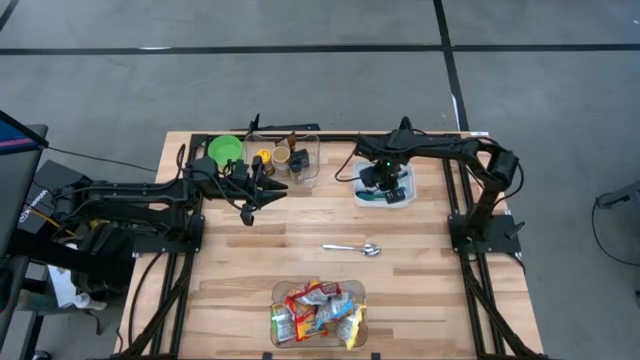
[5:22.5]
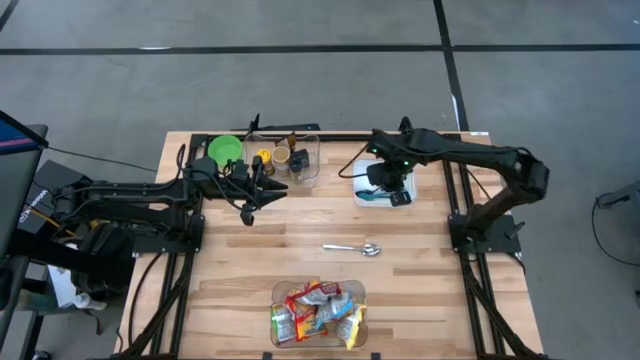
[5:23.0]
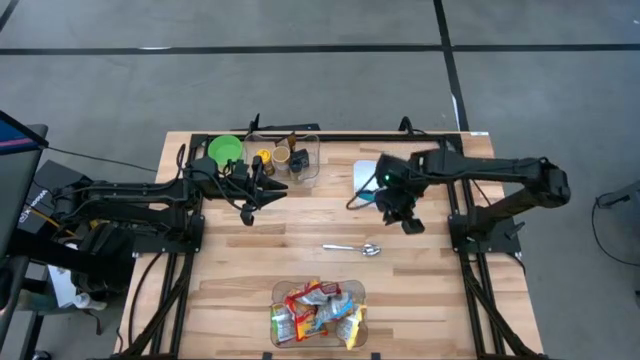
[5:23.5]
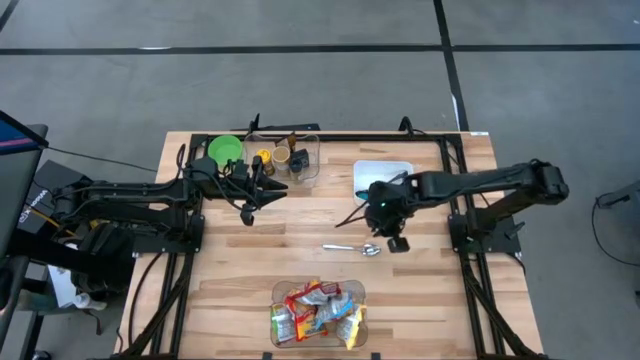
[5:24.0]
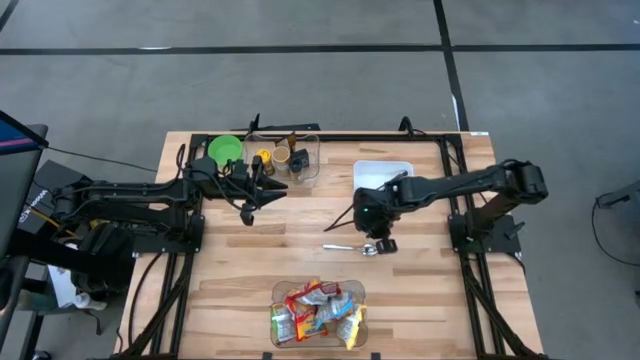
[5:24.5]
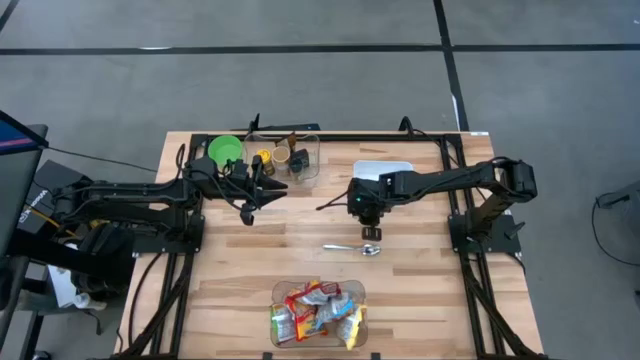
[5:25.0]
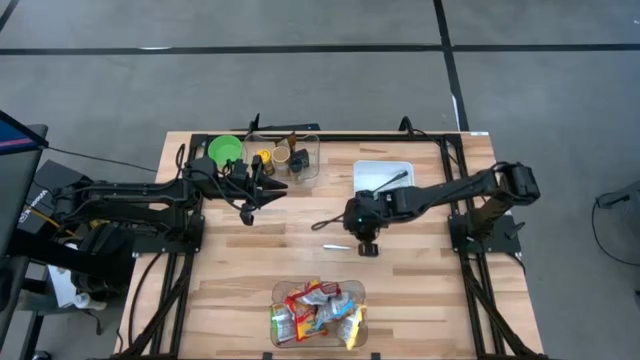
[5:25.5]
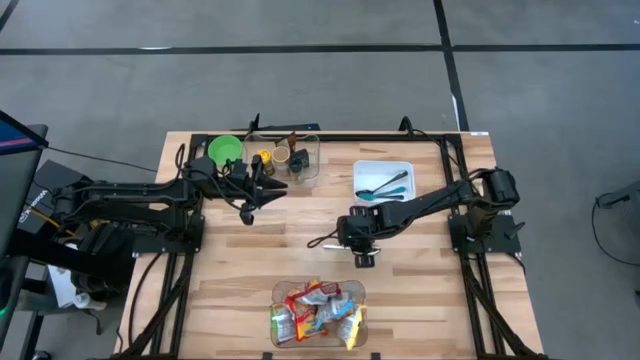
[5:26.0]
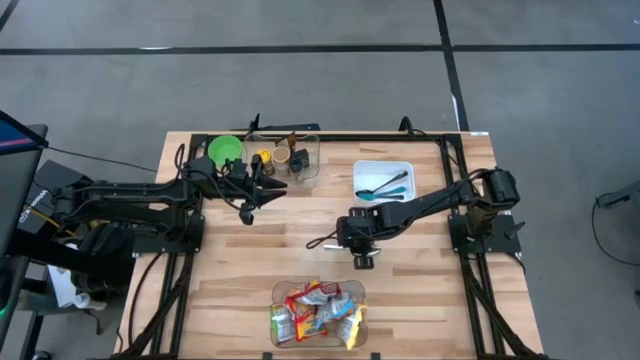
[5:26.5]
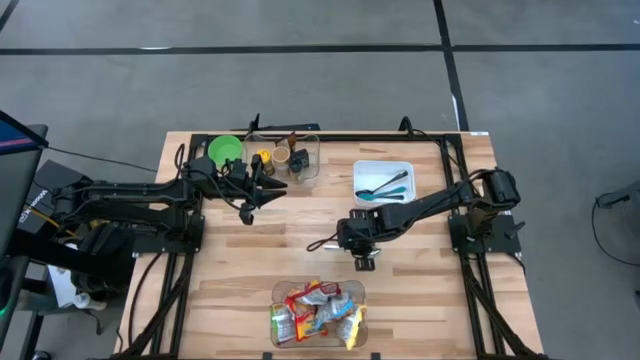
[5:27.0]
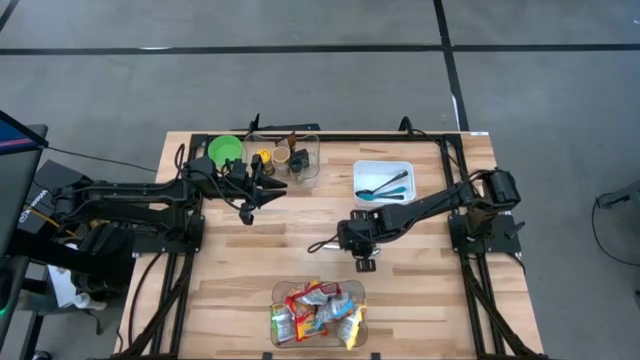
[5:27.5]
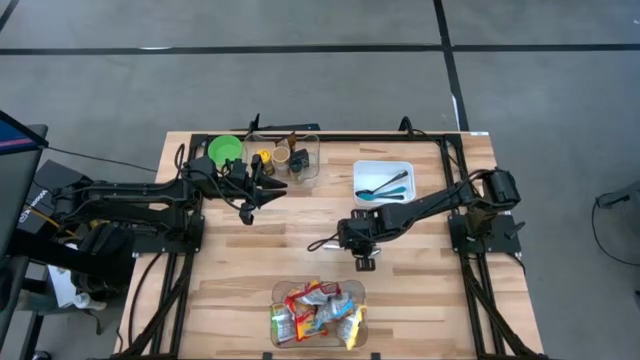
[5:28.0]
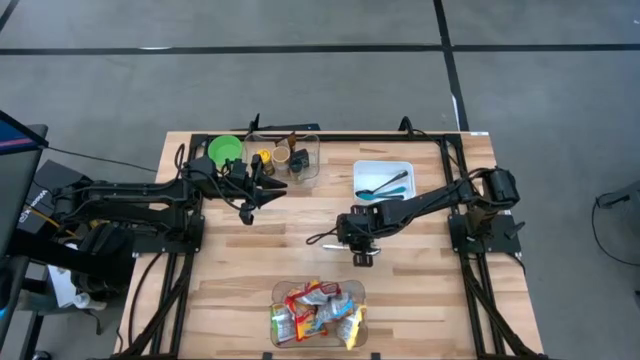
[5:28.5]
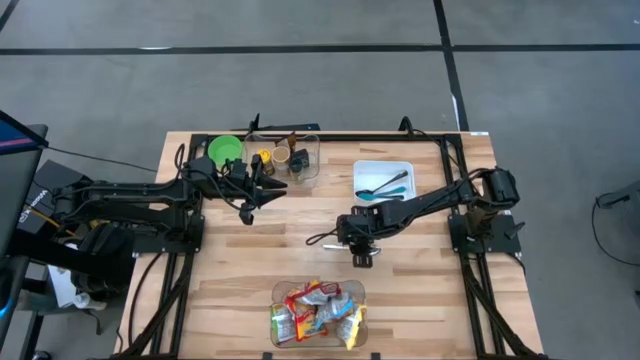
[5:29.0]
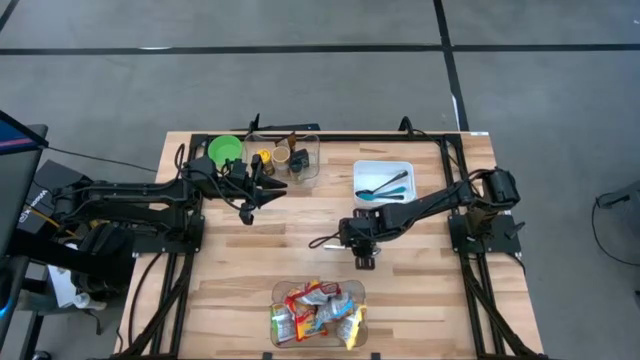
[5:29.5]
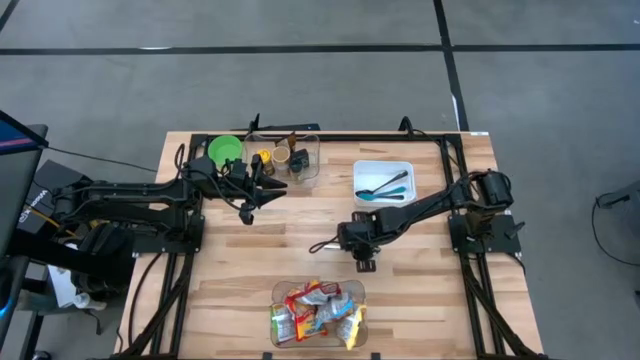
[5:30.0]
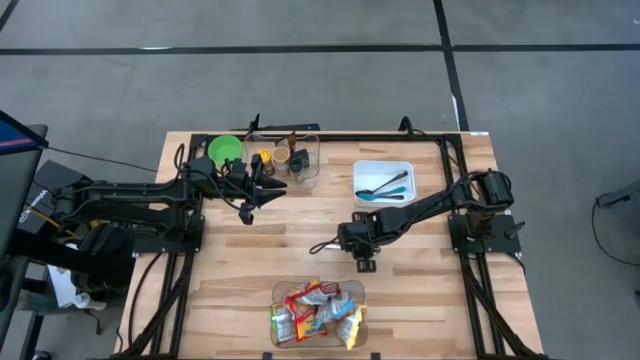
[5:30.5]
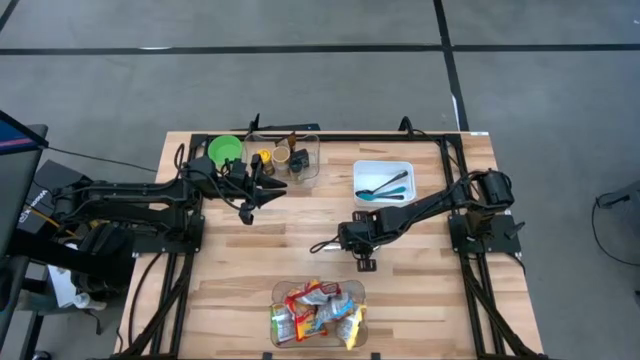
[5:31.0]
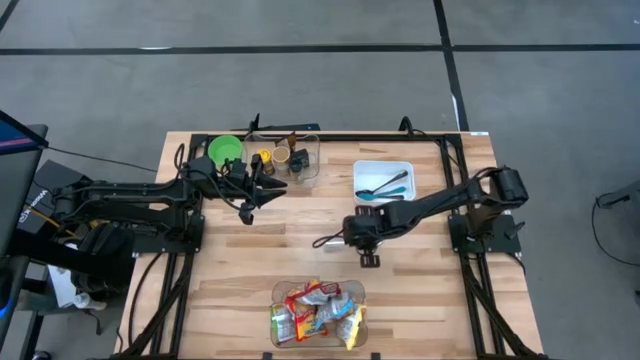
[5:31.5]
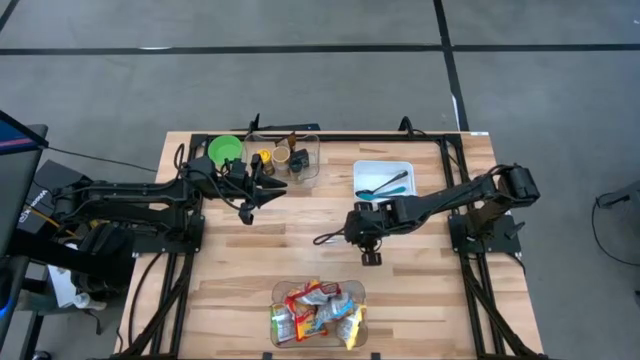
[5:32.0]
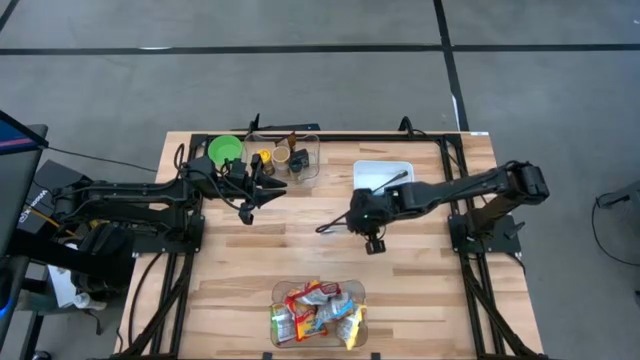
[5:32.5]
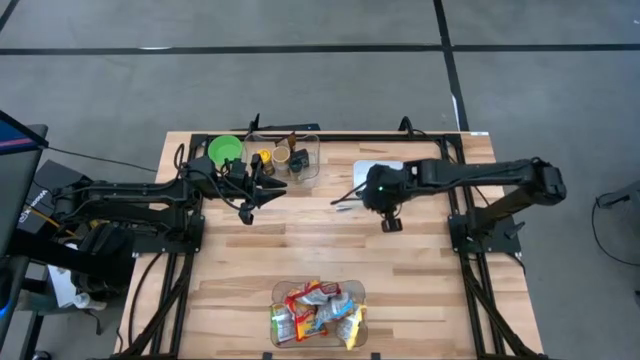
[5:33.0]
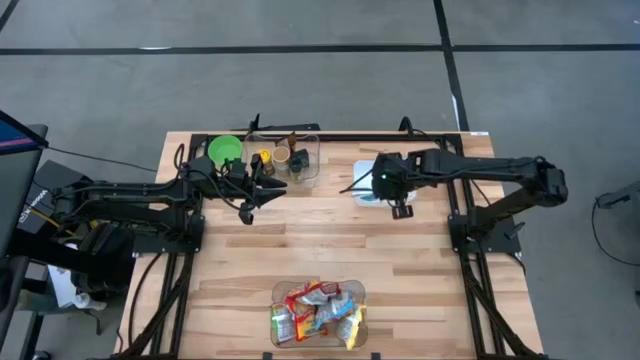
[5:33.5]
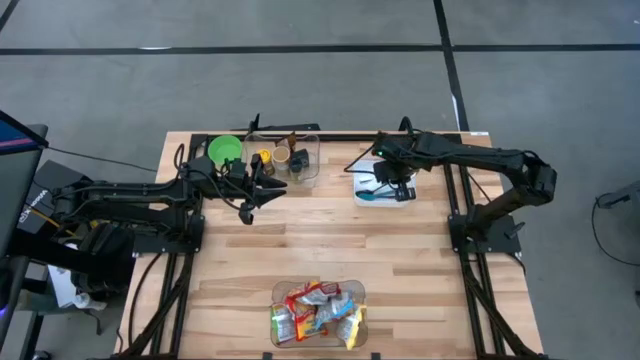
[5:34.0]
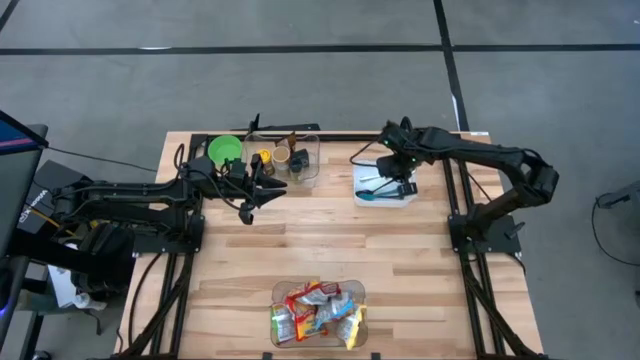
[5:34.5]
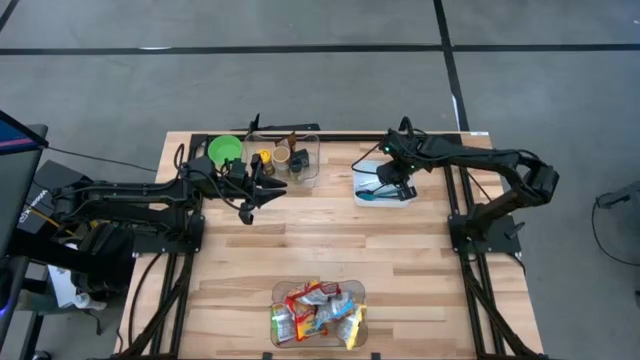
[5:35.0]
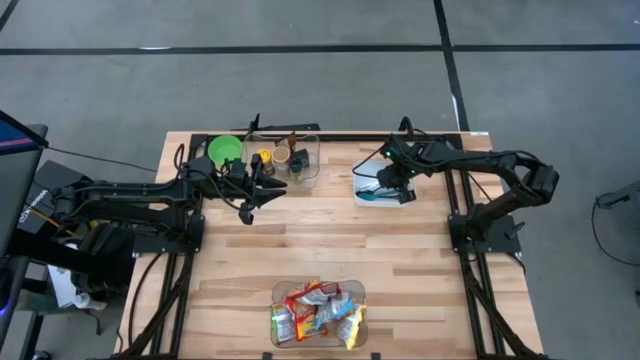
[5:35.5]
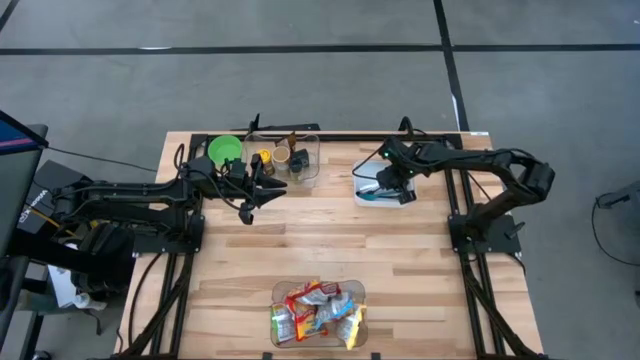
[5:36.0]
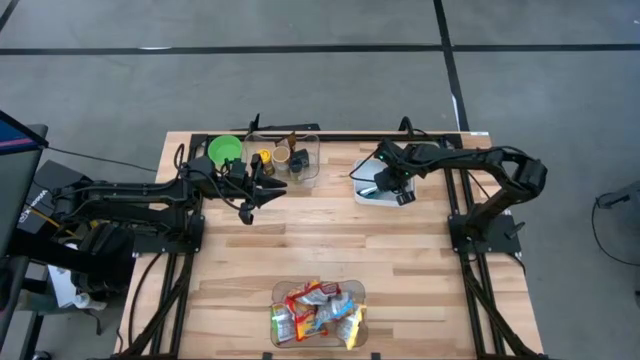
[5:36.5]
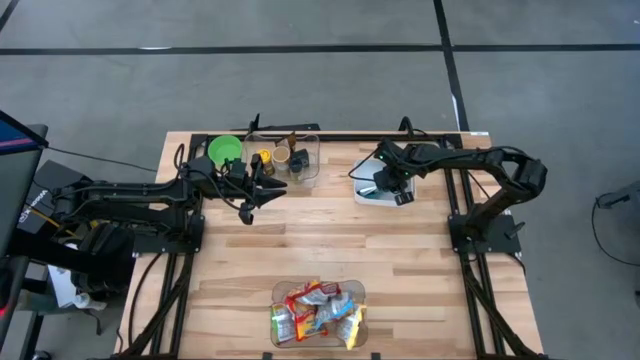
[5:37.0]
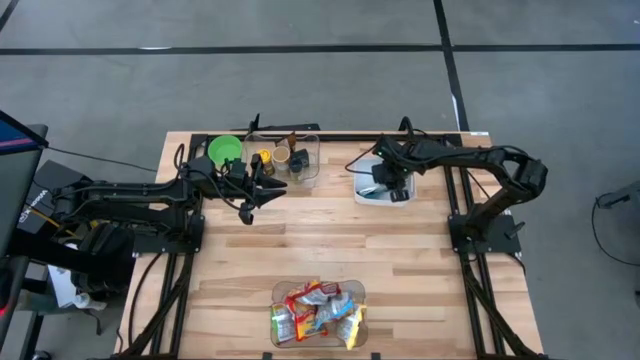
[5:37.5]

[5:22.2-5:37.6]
Task: Pick & Place Food Item
Put the silver spoon into the white bin

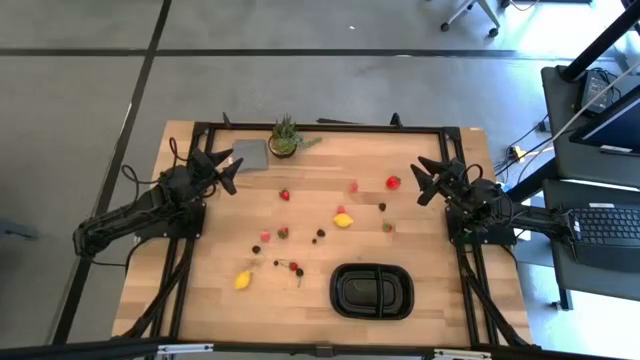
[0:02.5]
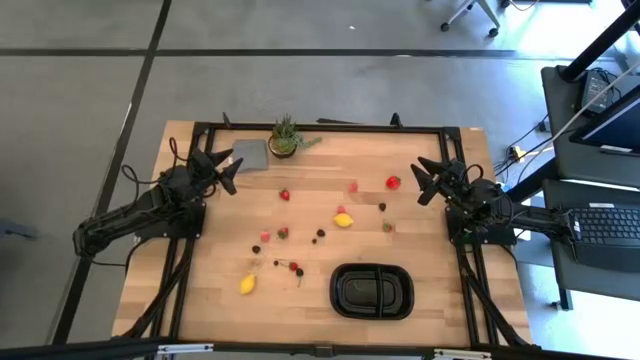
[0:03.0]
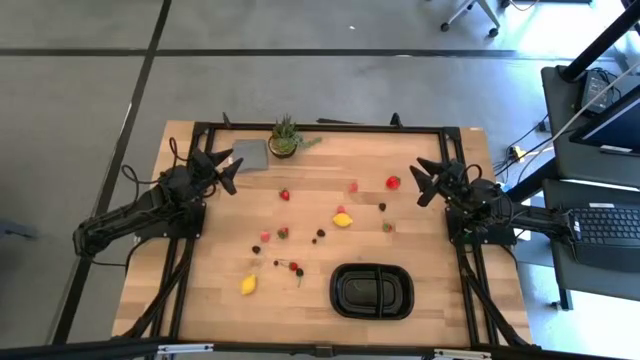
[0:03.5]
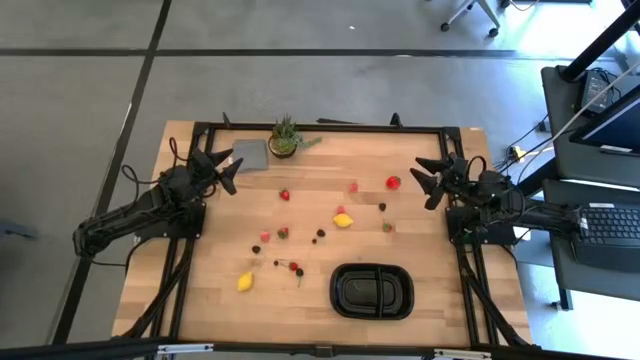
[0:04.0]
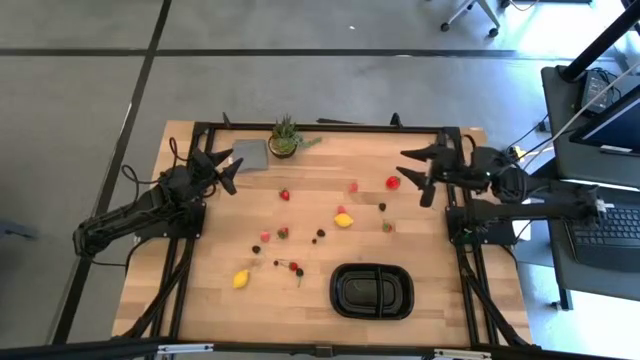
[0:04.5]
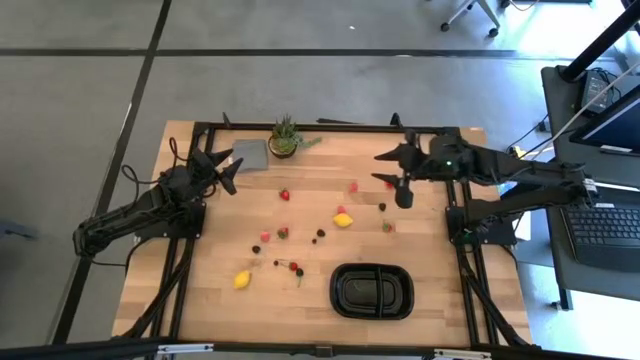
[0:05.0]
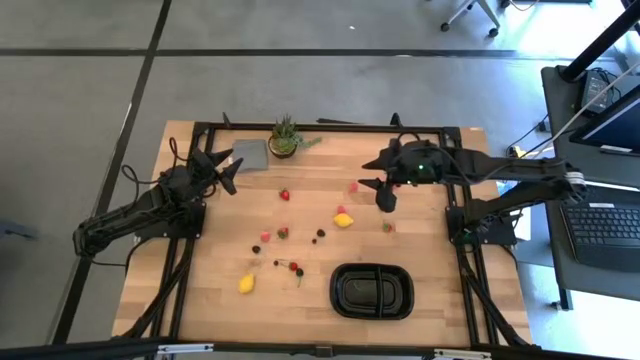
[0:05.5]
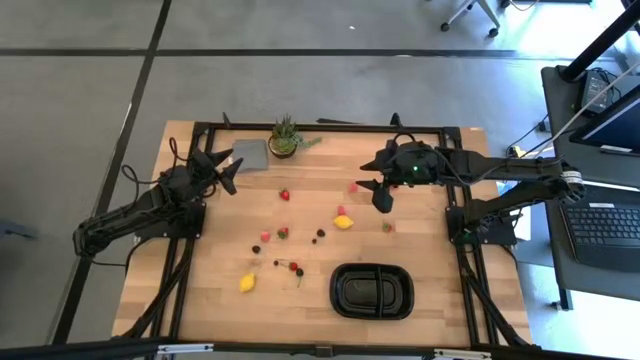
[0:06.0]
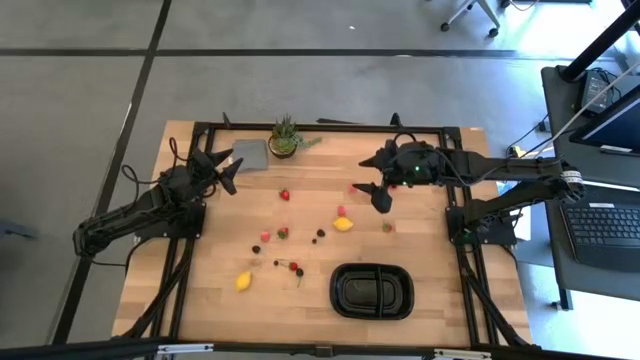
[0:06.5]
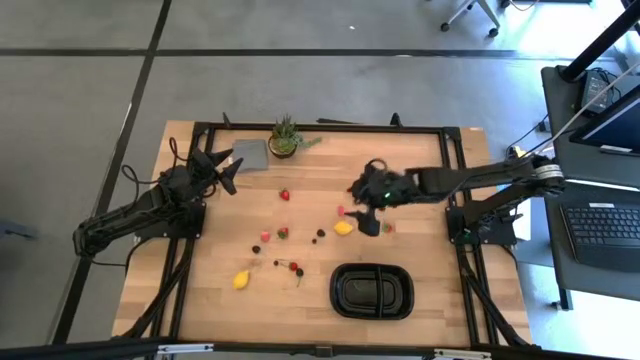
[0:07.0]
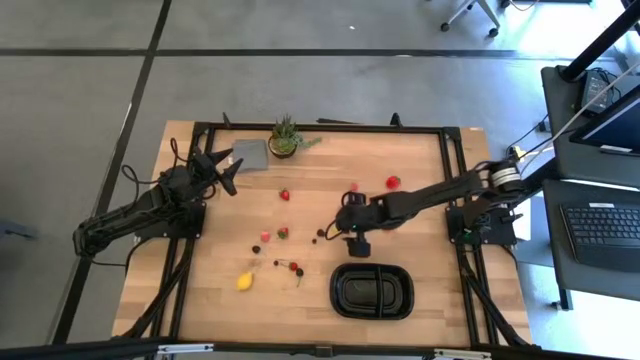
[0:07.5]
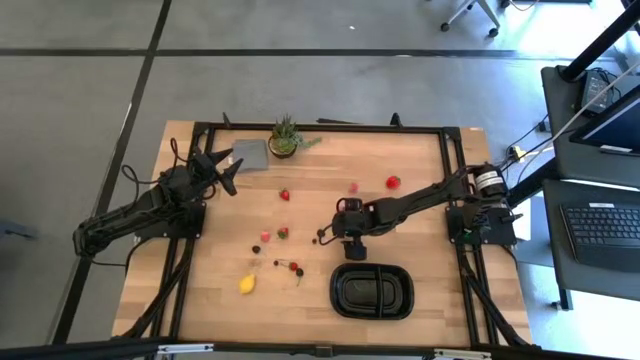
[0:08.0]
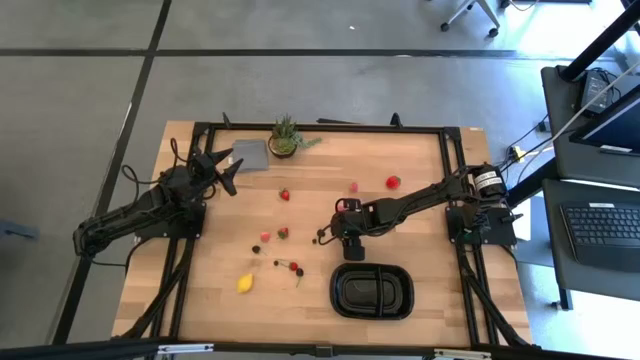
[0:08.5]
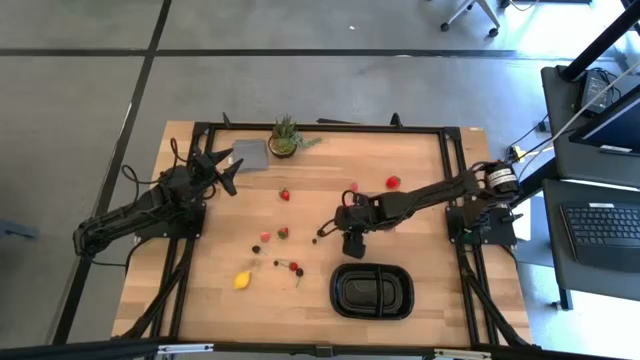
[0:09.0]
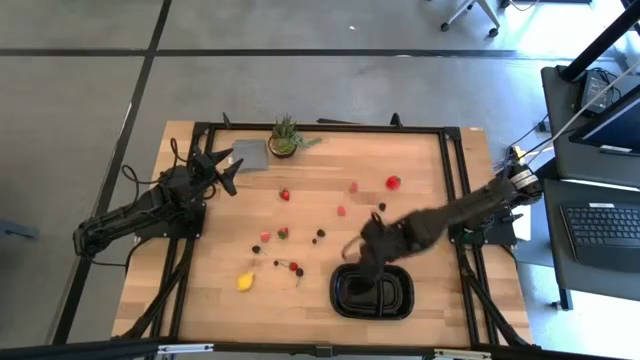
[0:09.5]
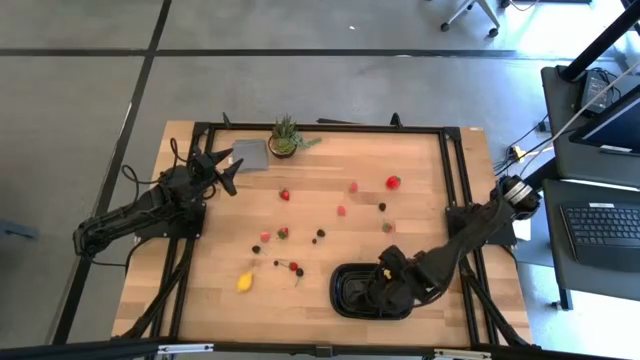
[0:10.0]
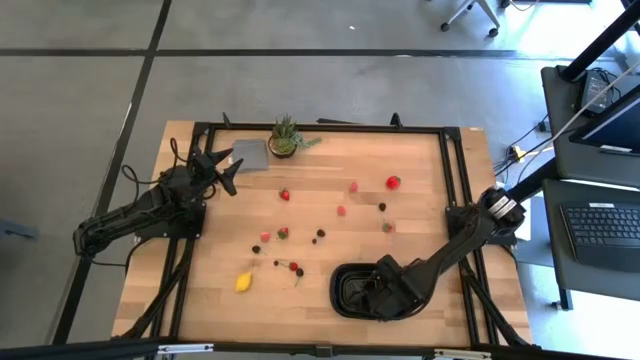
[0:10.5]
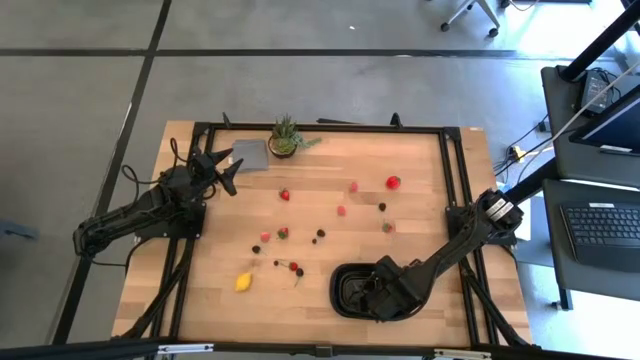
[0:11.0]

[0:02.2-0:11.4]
Task: Pick and placing Produce into tupperware
Put the yellow lemon into the black bin
